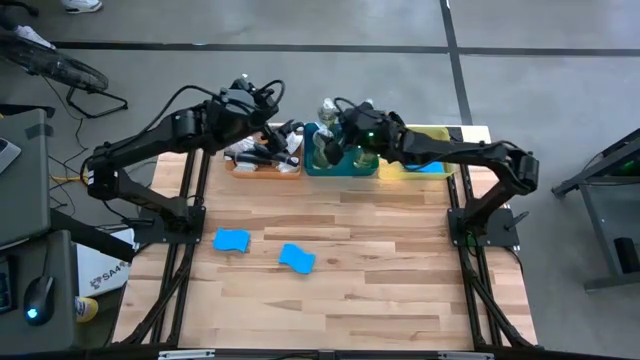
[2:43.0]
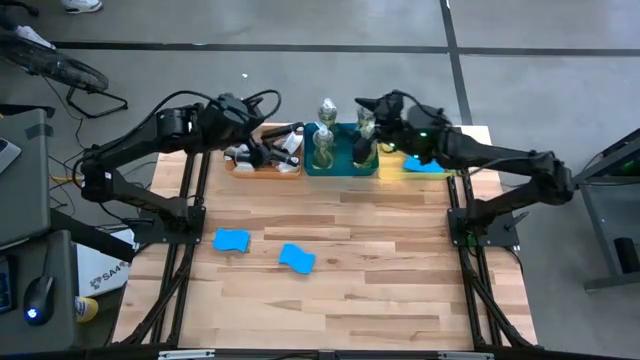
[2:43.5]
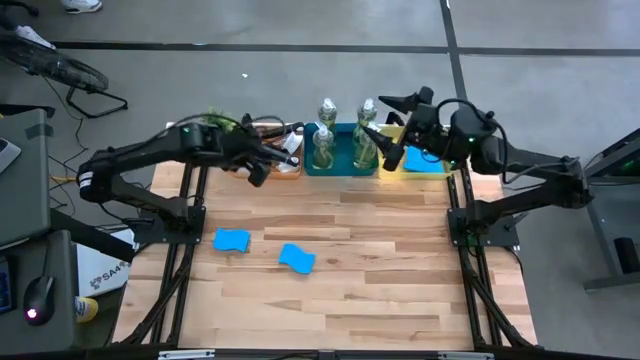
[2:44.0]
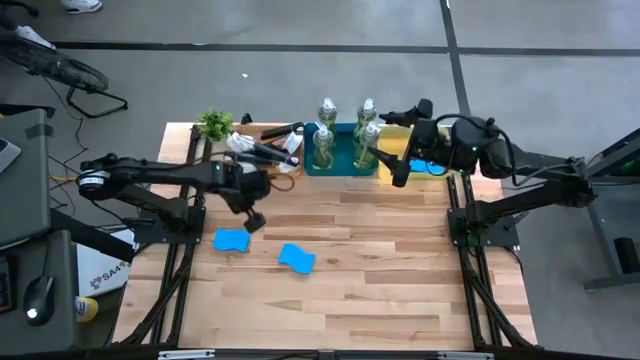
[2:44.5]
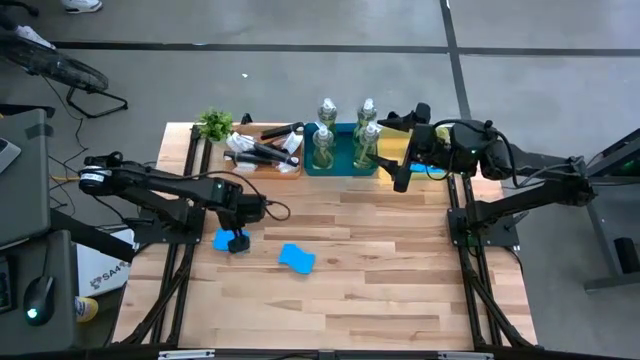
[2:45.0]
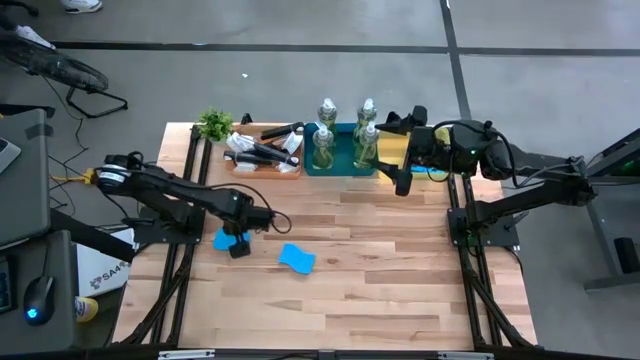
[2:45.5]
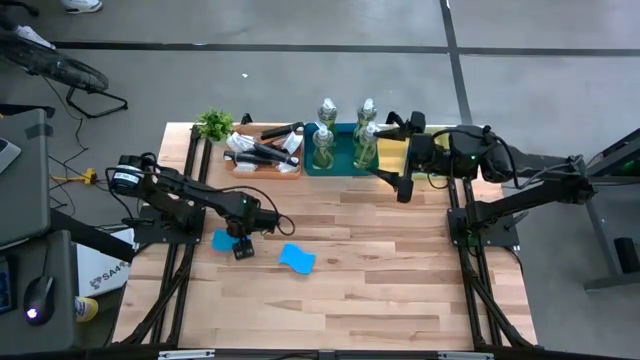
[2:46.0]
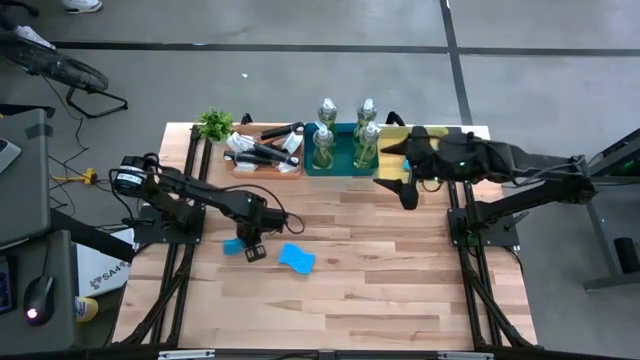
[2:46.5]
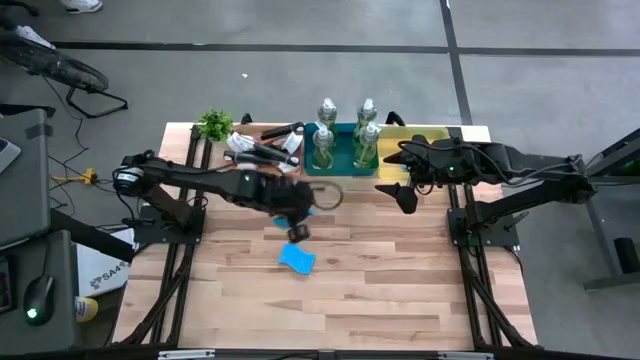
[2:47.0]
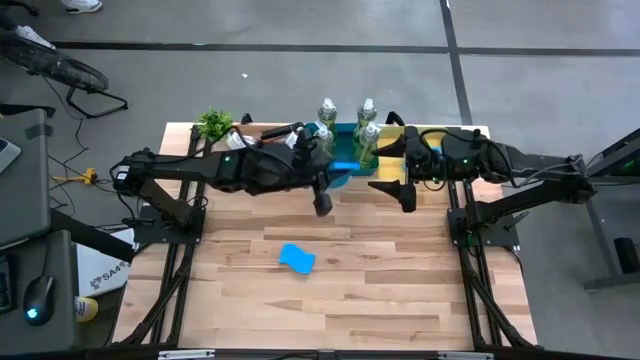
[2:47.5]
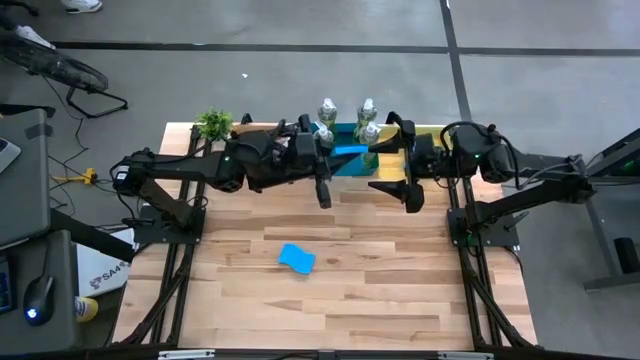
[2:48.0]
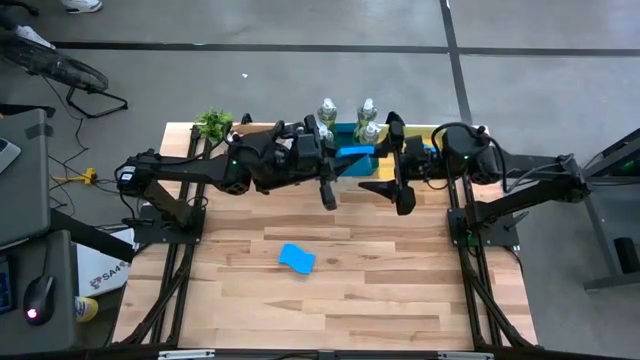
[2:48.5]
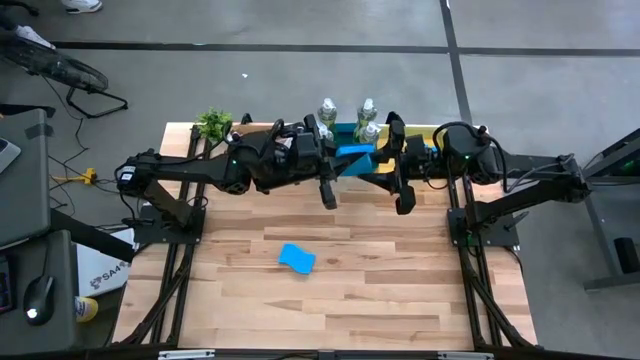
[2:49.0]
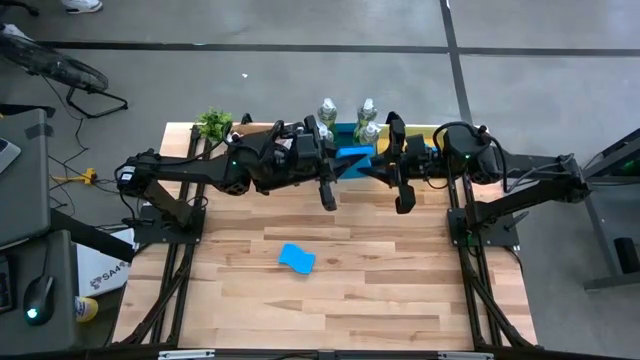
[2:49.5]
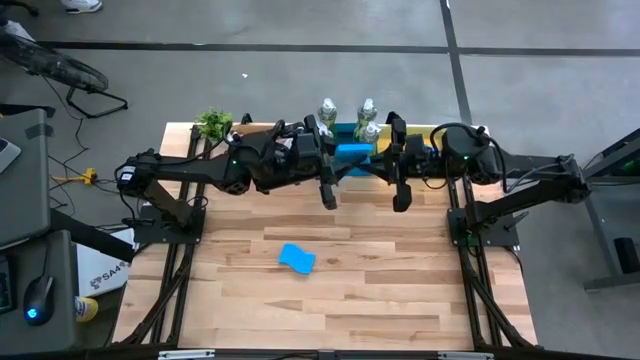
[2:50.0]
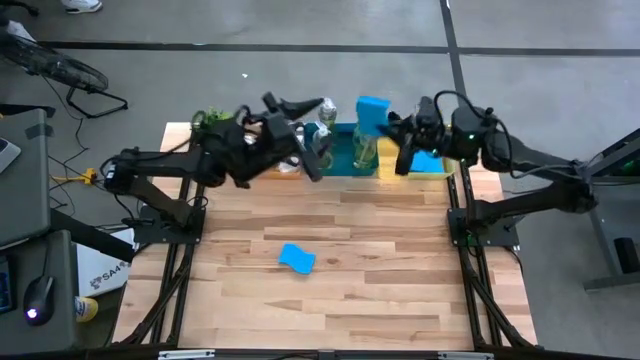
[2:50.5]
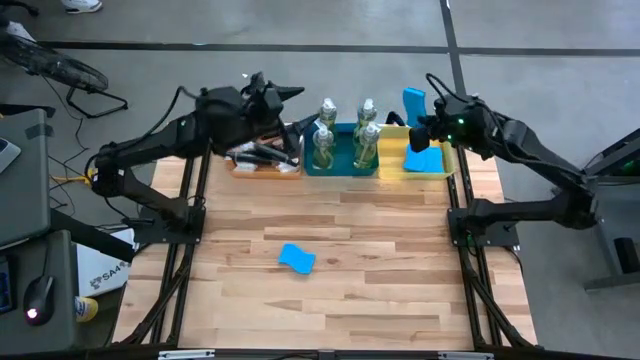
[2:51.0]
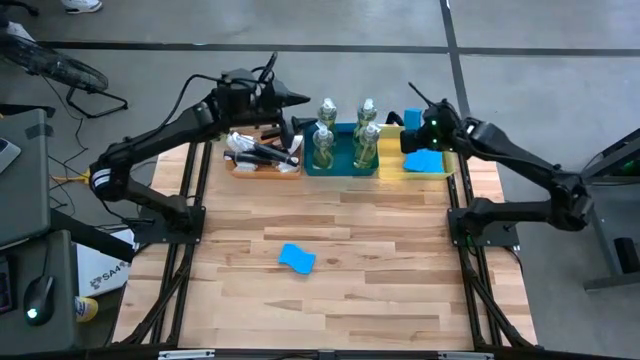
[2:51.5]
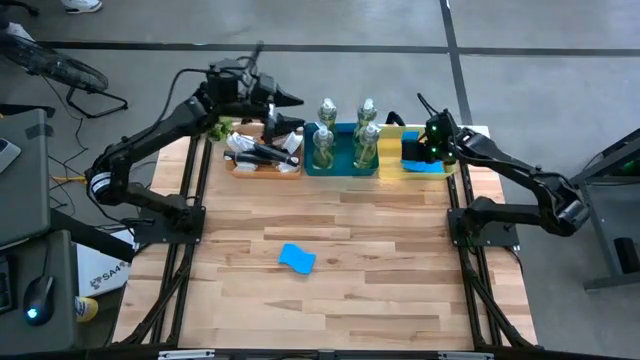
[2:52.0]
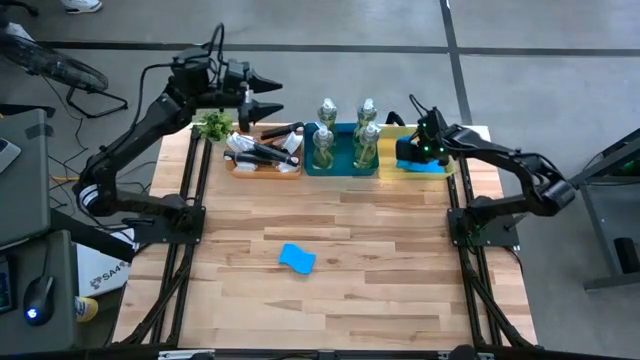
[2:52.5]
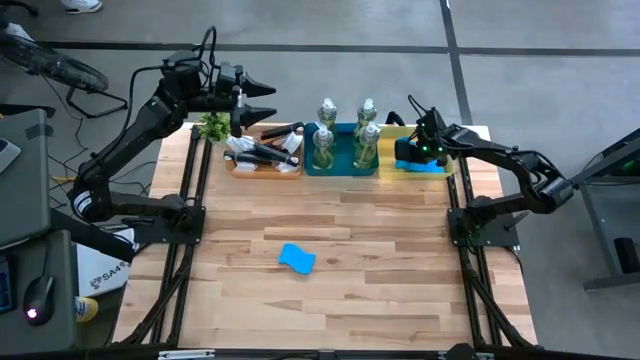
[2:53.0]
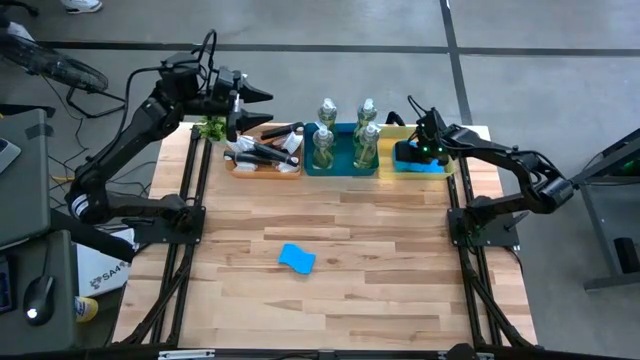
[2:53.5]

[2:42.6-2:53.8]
Task: Pick & Place Kitchen Sink Supplies
Put the blue sponge into the yellow bin

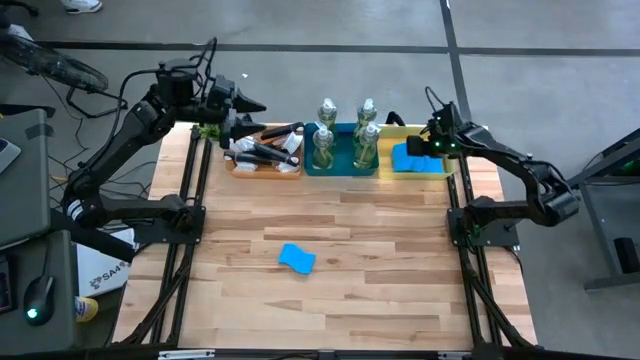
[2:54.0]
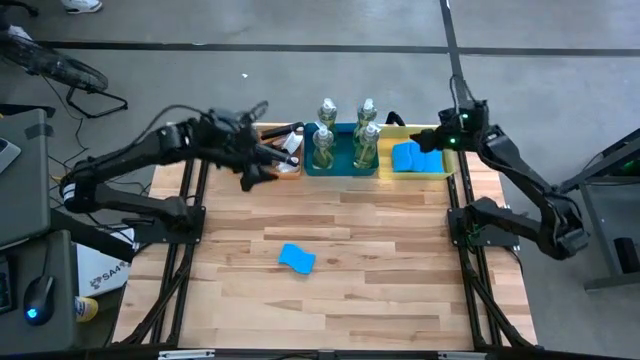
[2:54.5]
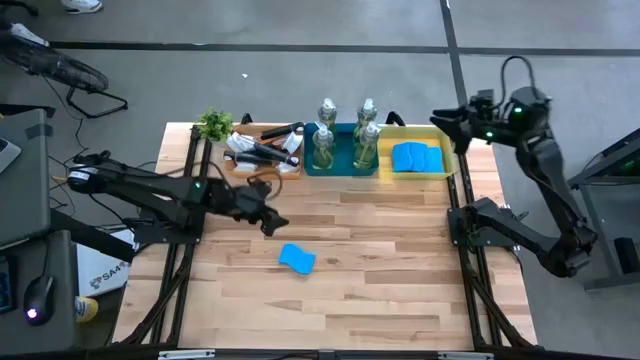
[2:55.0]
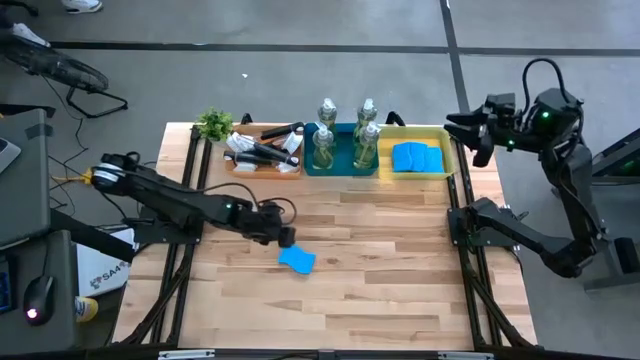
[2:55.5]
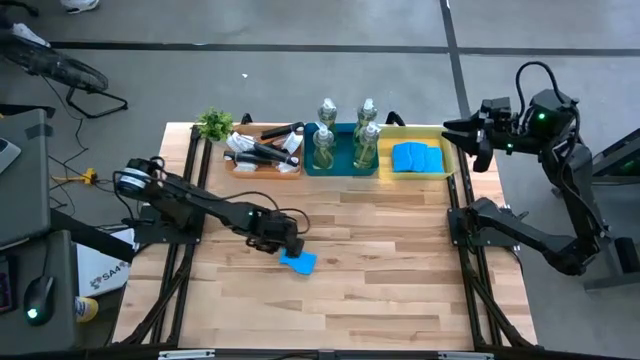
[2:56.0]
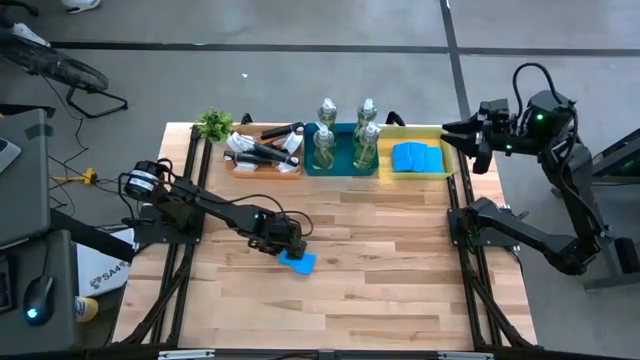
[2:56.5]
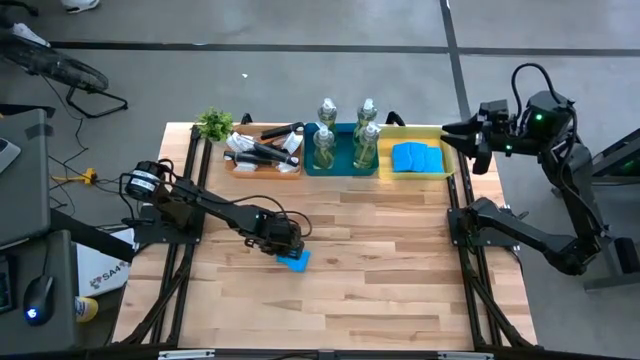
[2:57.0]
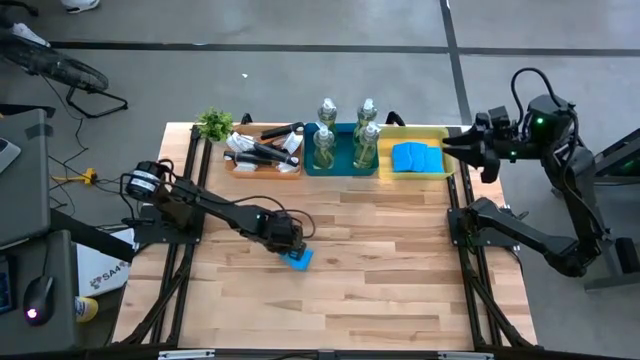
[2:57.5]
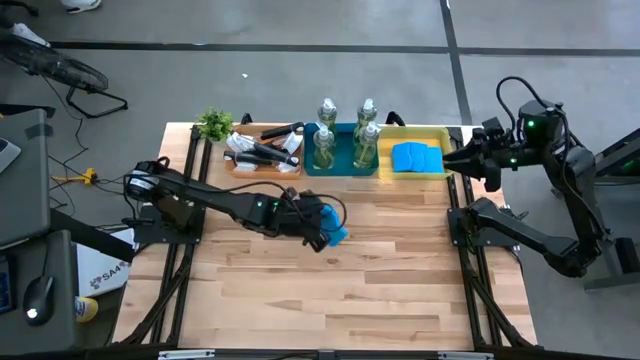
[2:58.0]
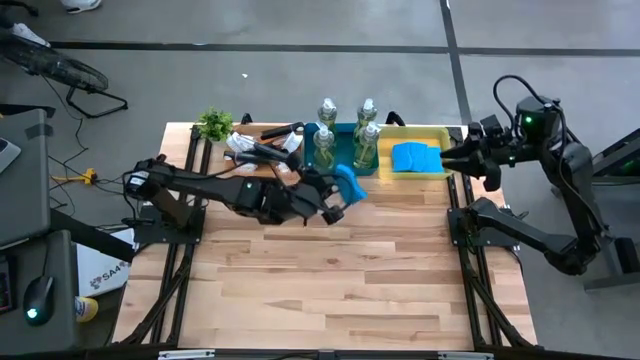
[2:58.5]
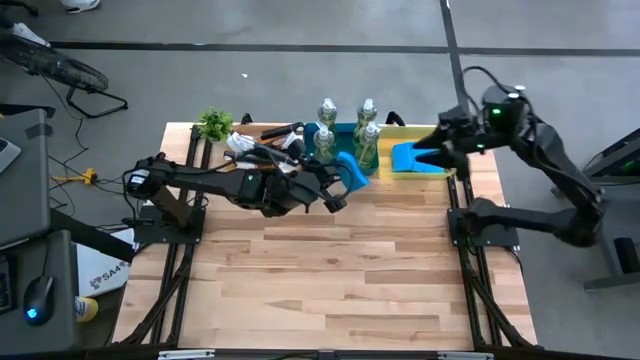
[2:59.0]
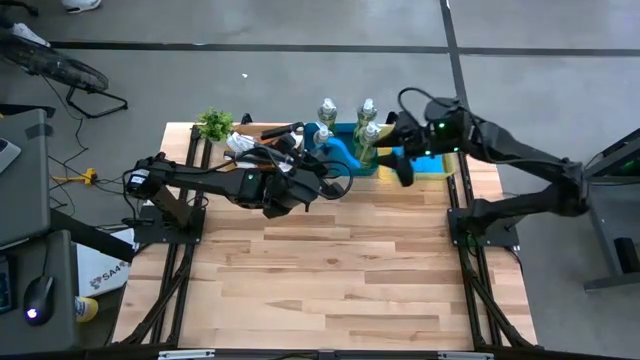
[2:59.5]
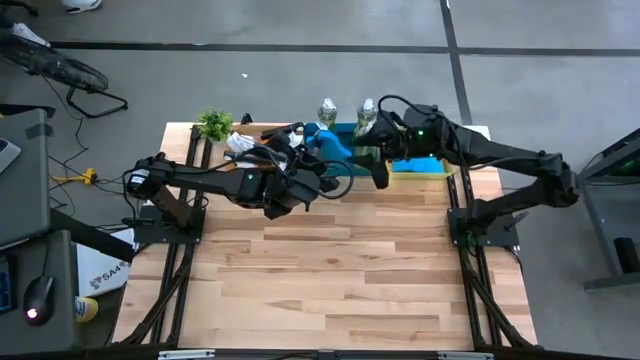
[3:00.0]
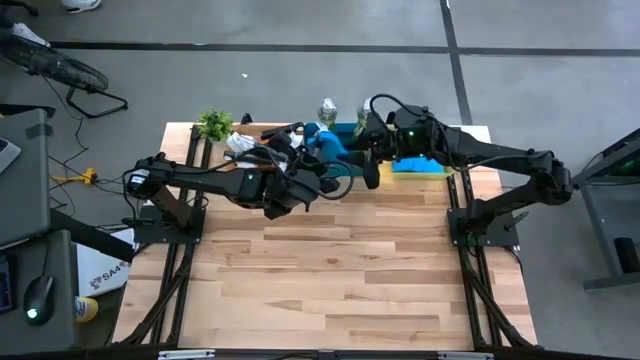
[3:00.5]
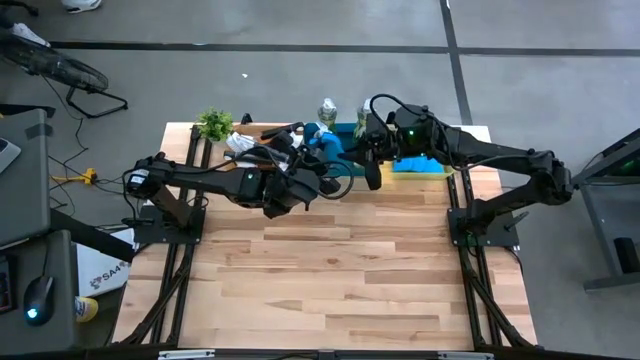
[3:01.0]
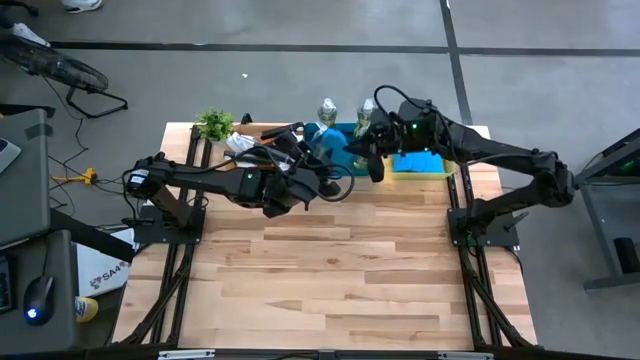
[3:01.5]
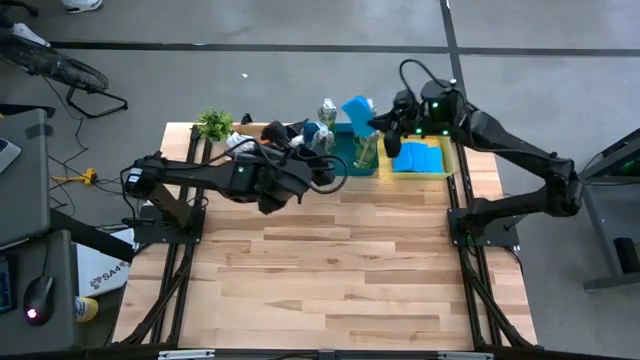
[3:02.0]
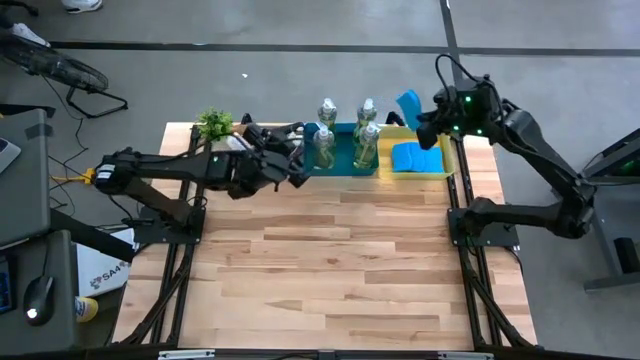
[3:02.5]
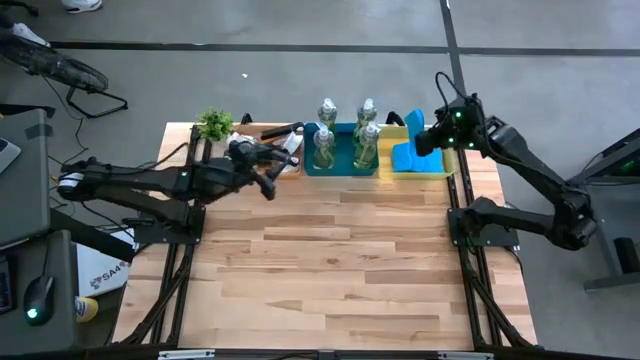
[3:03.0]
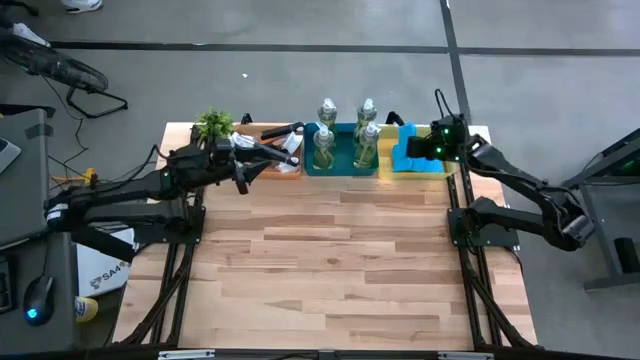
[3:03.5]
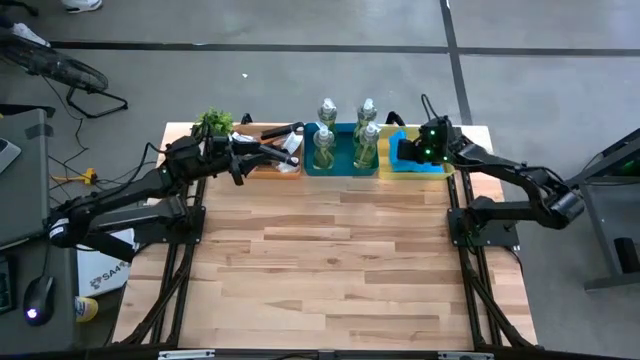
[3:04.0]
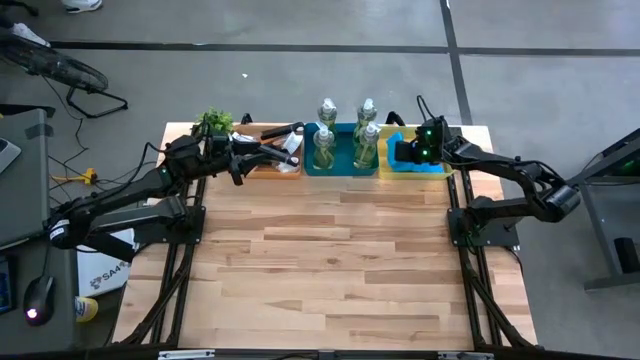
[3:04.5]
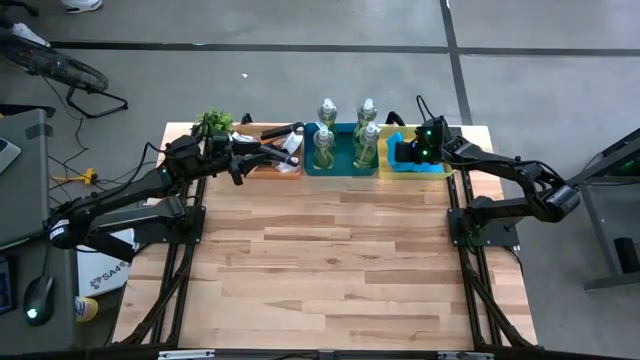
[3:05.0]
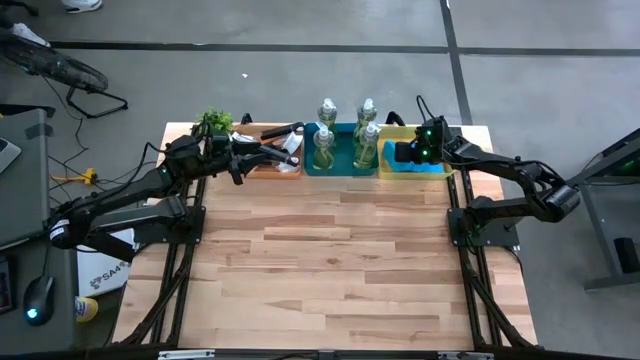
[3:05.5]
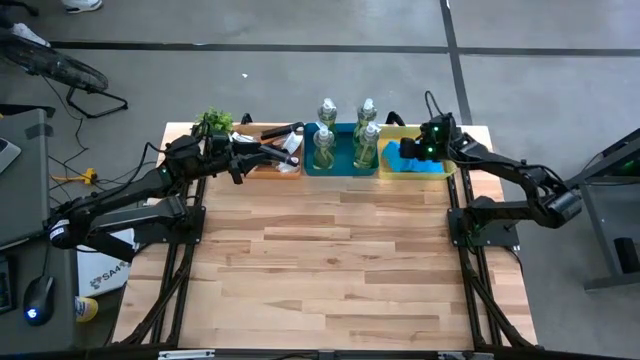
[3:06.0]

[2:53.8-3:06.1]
Put the blue sponge into the yellow bin
